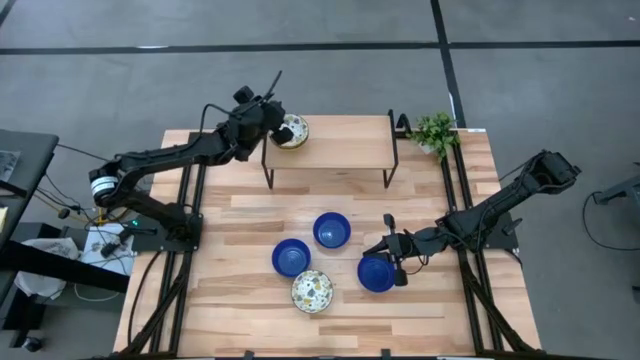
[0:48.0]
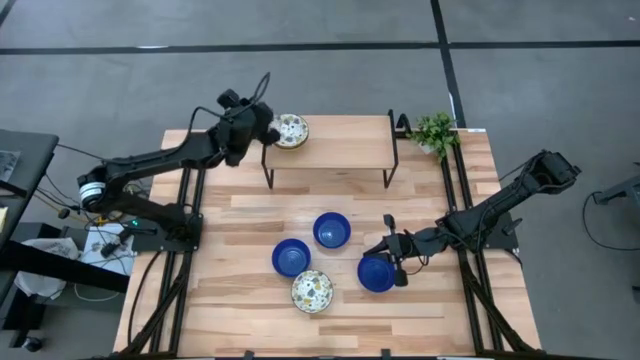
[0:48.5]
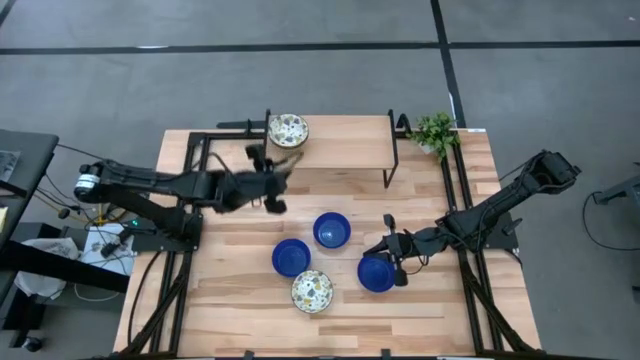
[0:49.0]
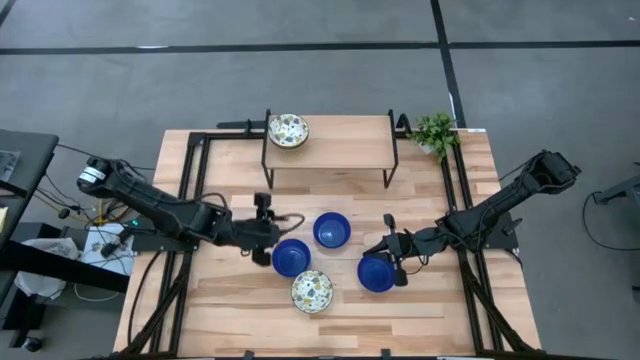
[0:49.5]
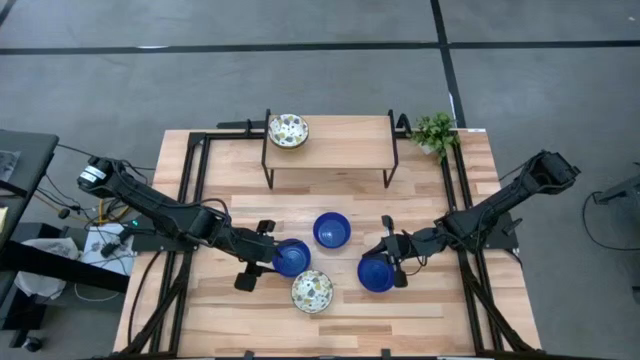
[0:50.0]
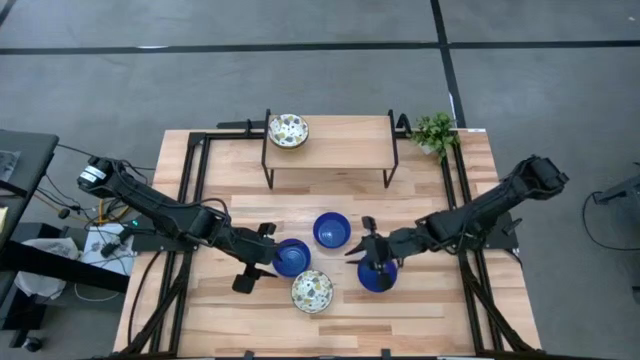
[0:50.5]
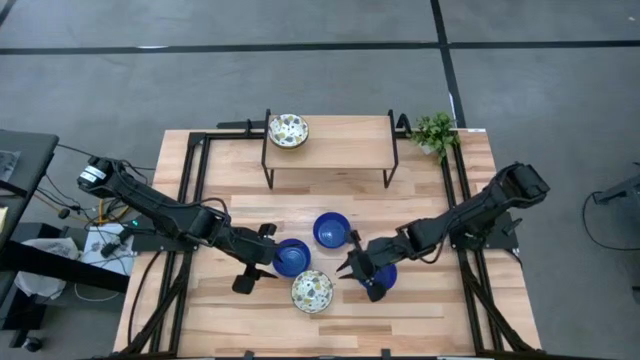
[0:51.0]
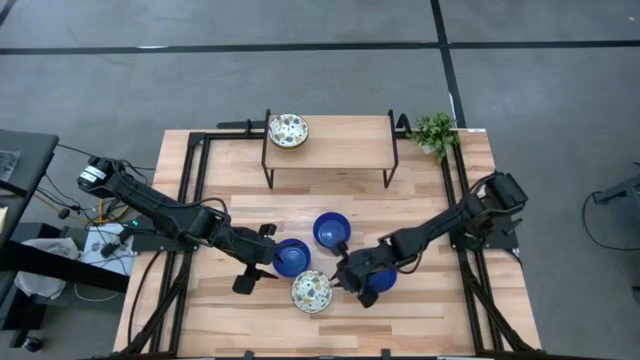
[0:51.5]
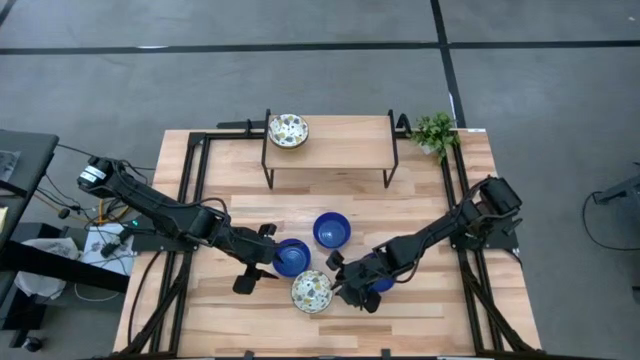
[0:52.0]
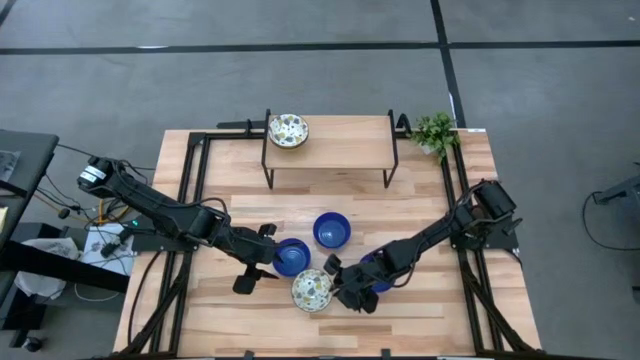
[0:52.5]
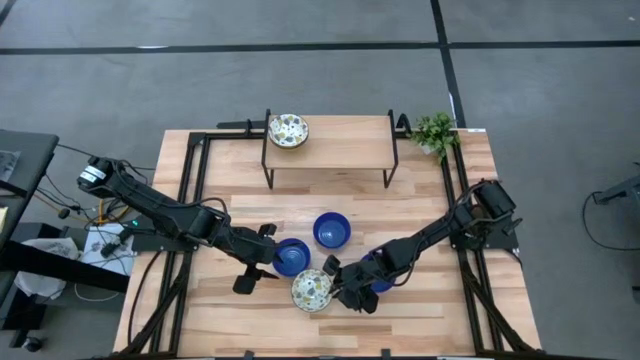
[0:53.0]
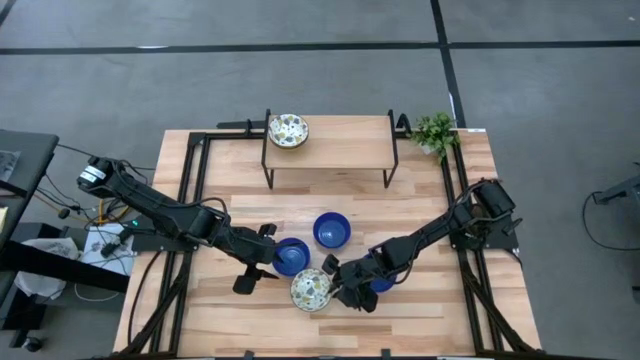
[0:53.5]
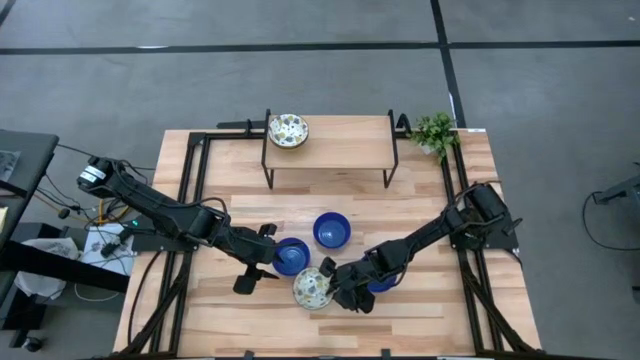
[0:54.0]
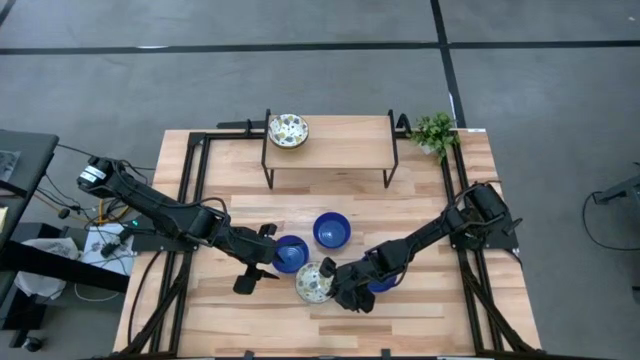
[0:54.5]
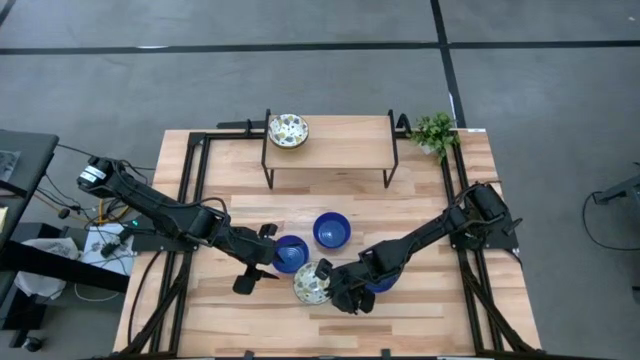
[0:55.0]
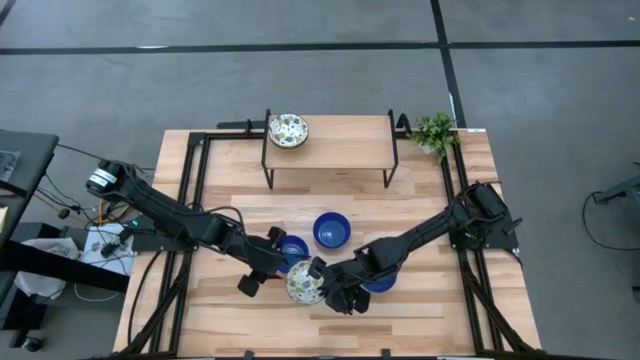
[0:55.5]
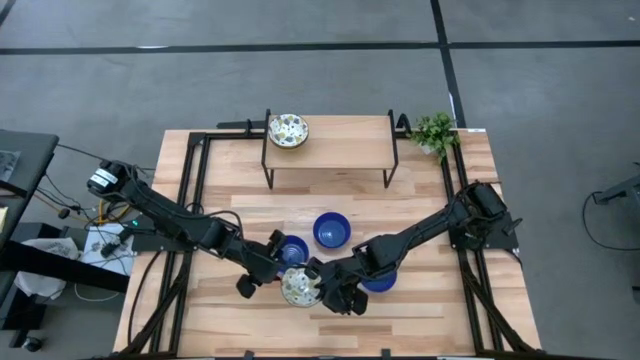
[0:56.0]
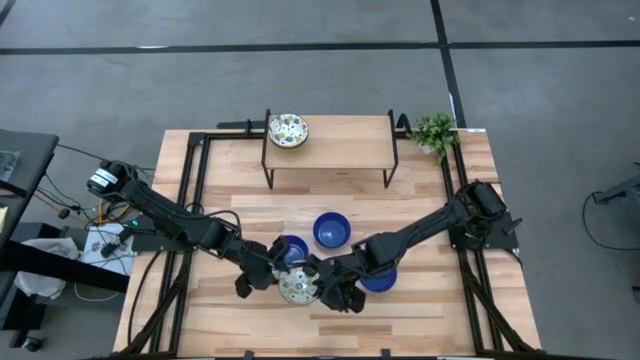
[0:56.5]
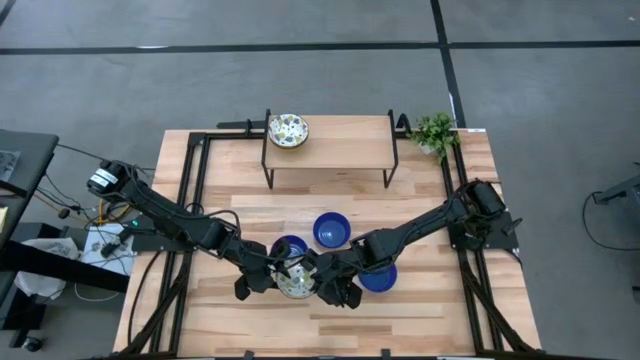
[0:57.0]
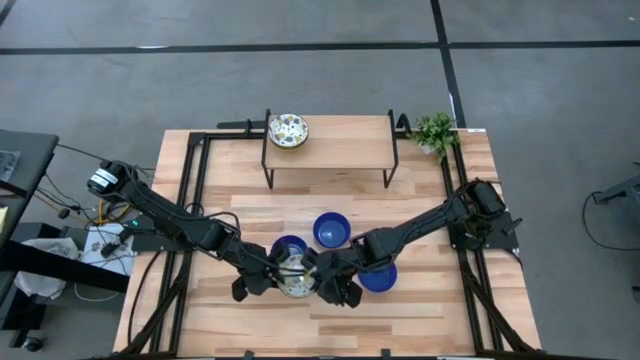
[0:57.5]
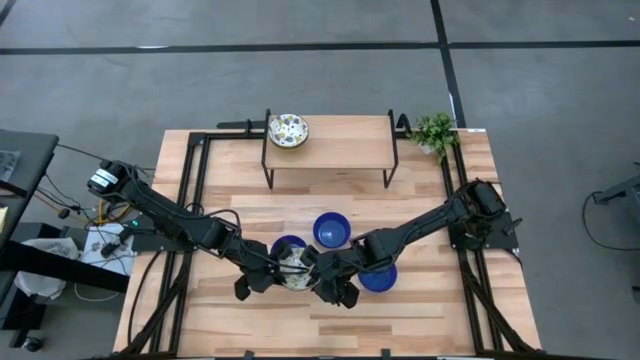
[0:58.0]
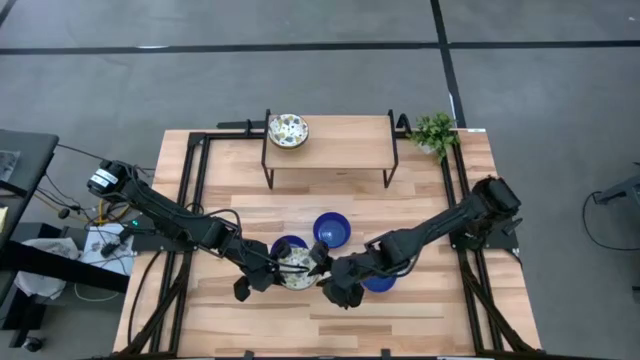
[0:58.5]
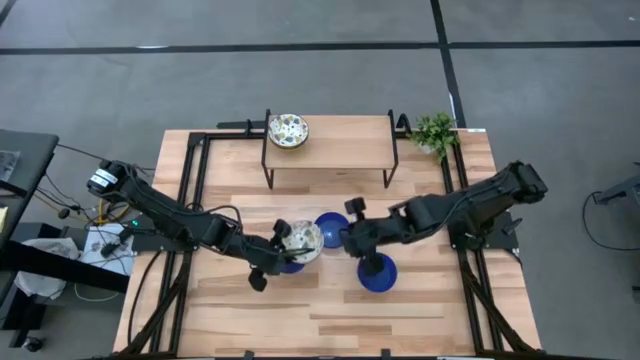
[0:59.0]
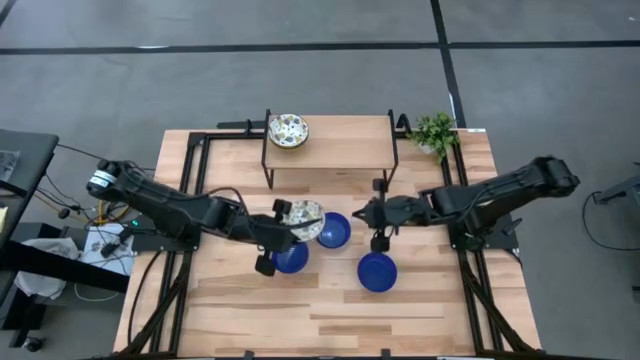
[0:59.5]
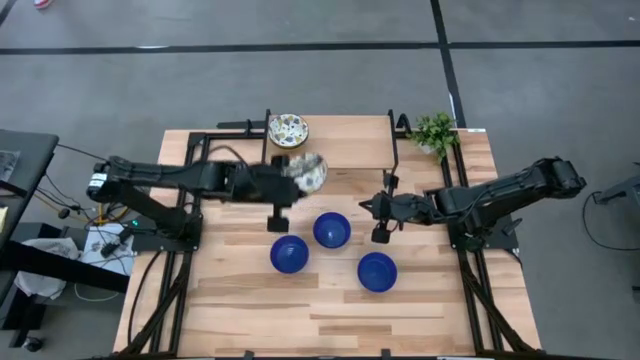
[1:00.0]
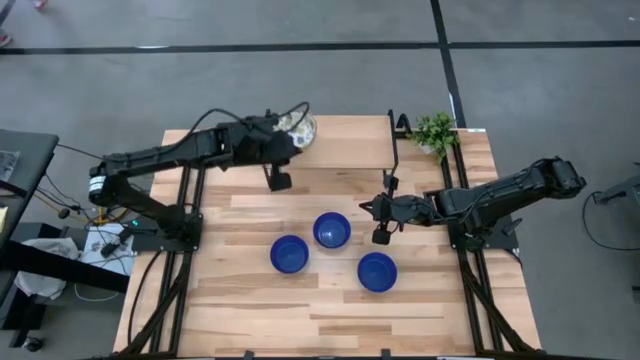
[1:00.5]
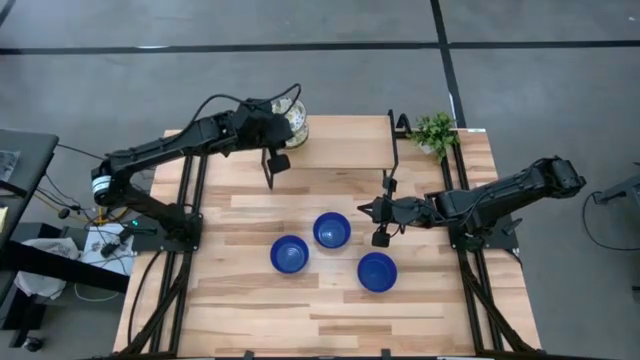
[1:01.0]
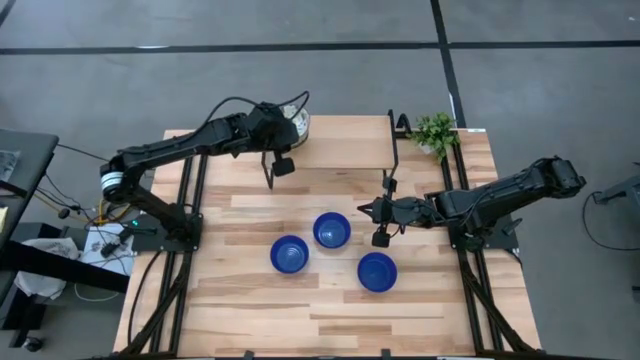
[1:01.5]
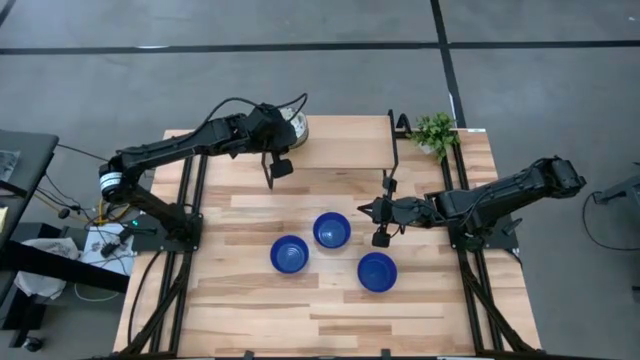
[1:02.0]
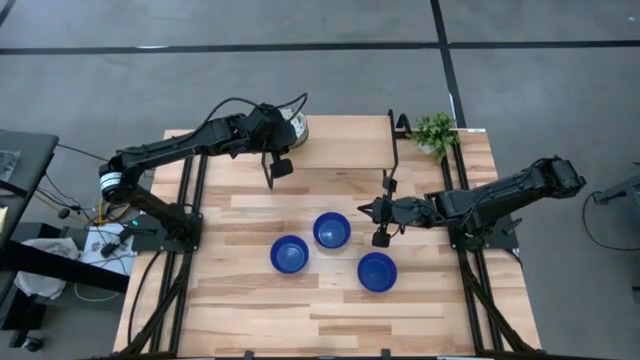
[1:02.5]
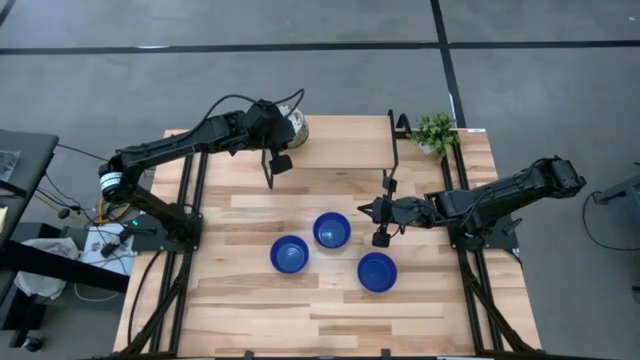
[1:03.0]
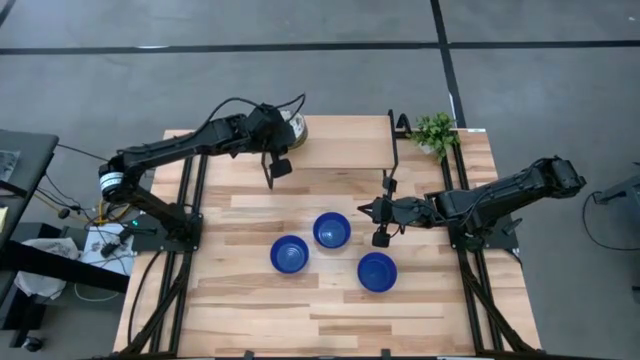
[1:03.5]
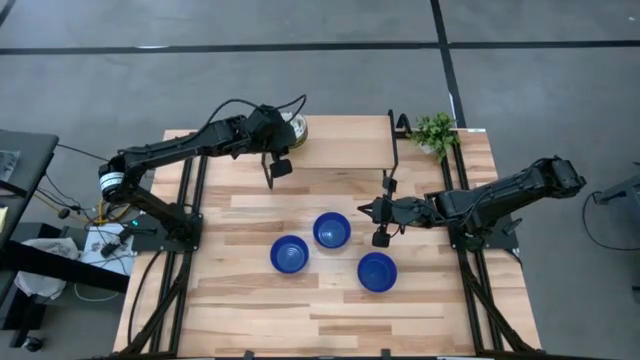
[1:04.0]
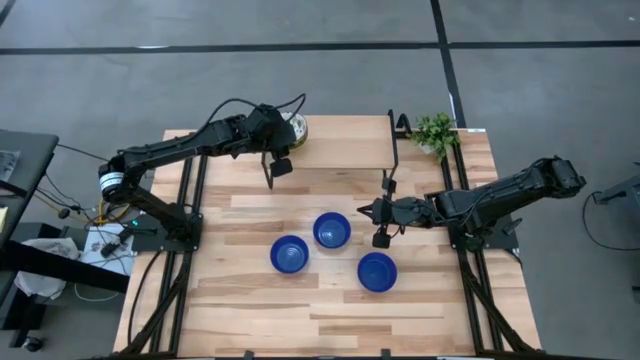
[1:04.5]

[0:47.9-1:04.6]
Task: Pick & Place Mini bowls
Stack the white pattern bowl on the top of the white pattern bowls on the shelf

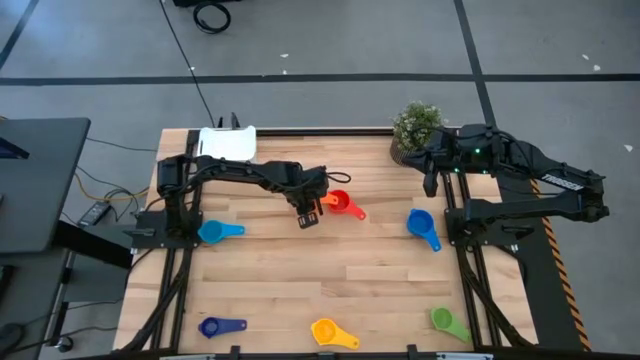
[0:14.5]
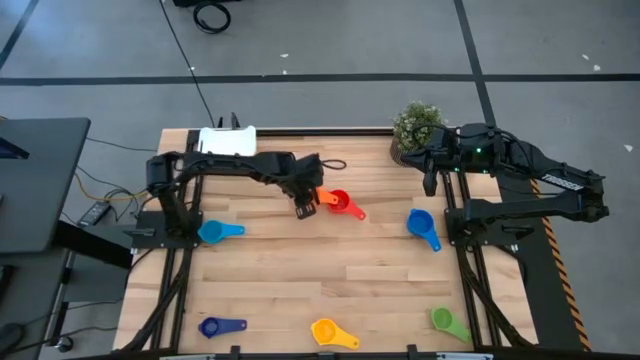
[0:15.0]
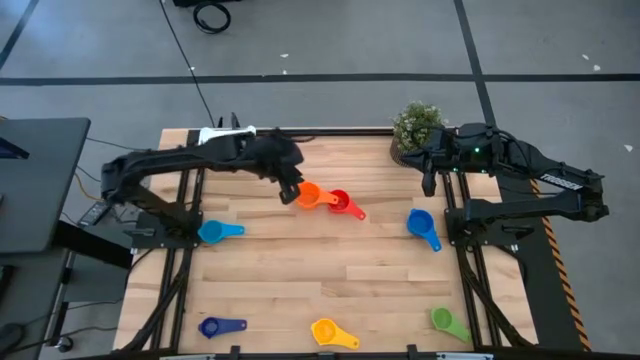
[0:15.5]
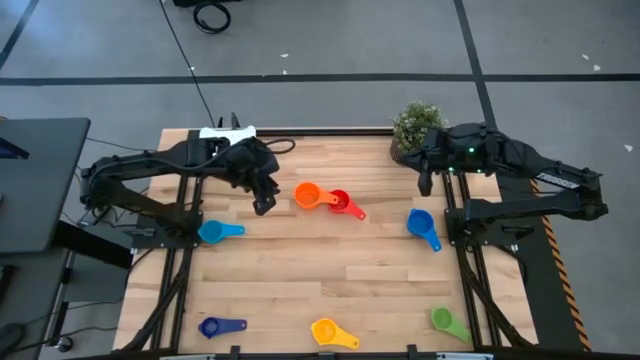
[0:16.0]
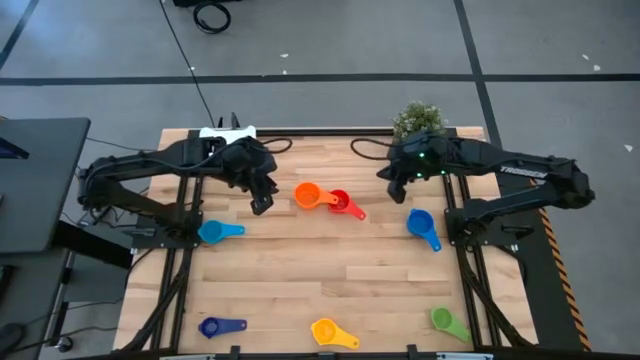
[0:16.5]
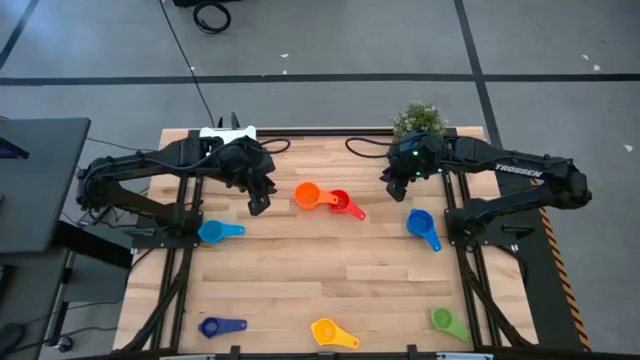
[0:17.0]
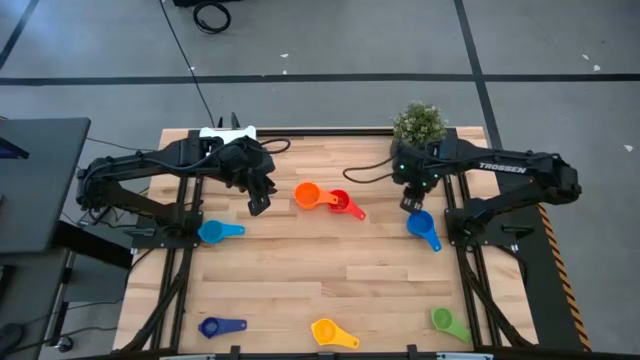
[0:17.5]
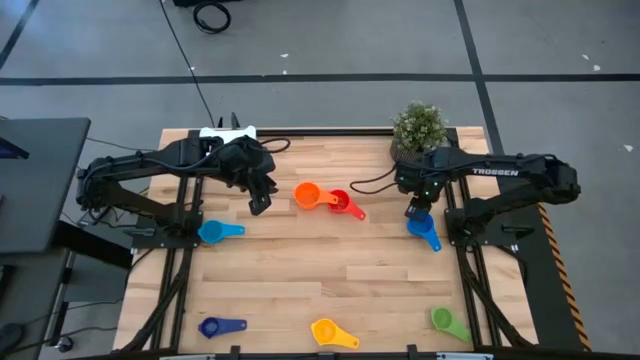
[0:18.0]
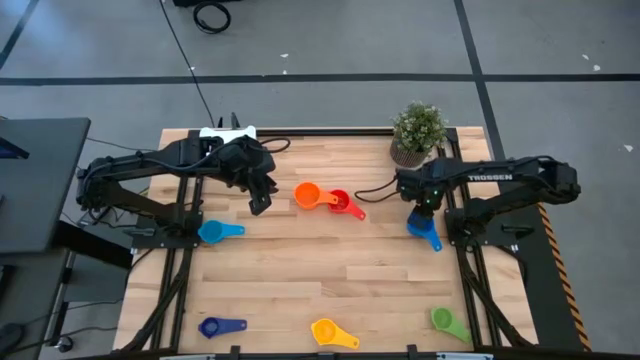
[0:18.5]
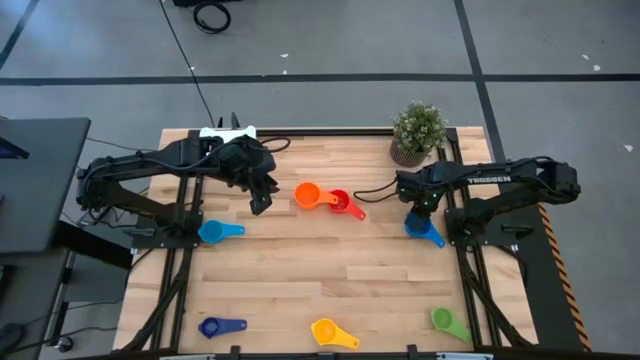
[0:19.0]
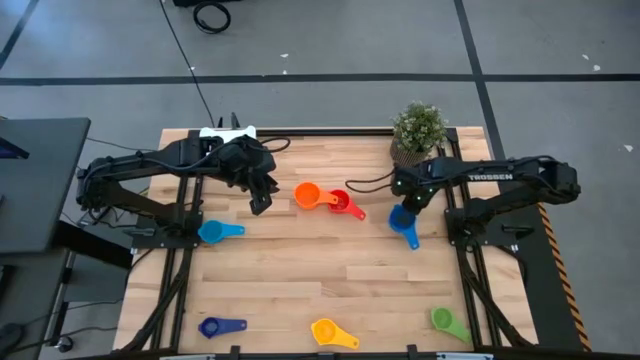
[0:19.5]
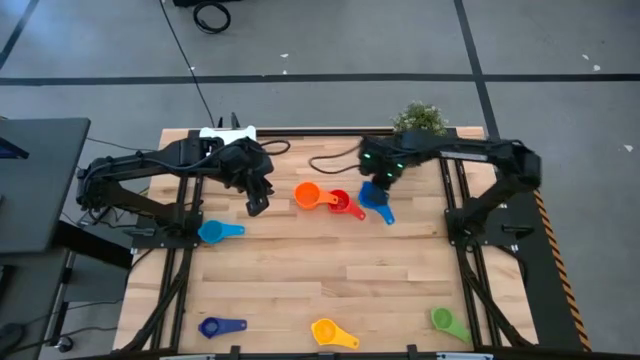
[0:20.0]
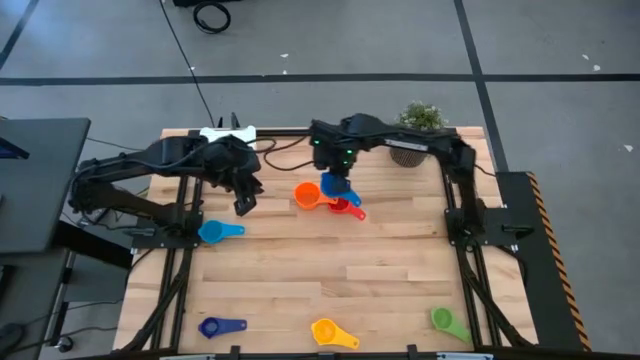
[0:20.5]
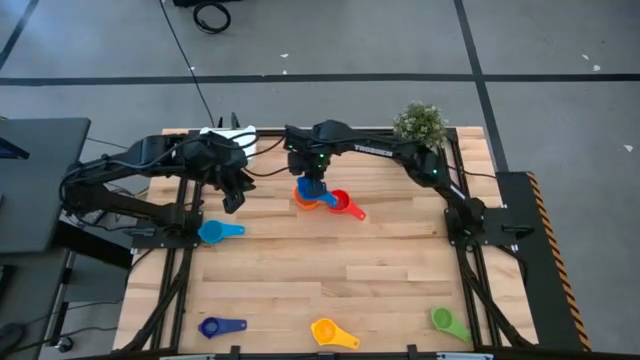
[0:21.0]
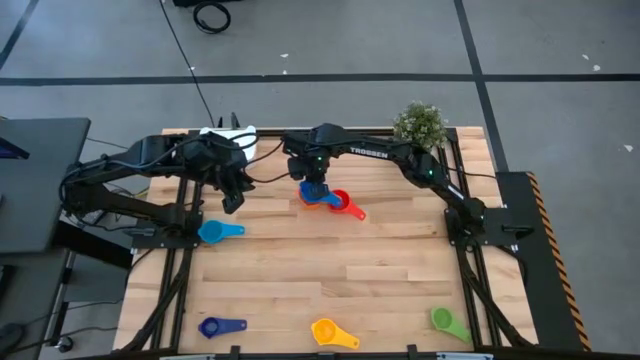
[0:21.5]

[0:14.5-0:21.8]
Task: Nest measuring cups in basket
Stack the blue measuring cup on top of the orange measuring cup
